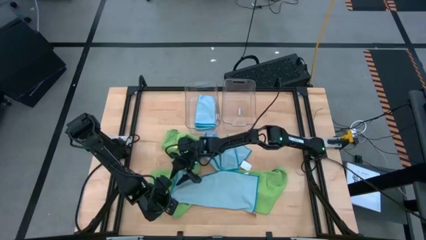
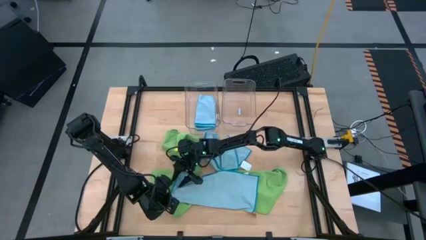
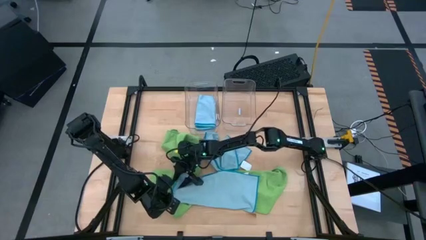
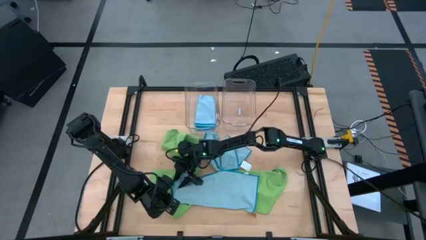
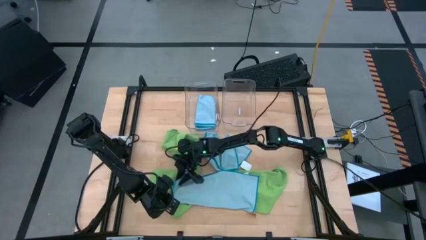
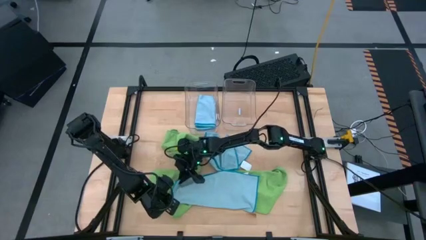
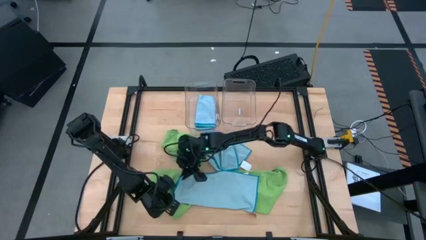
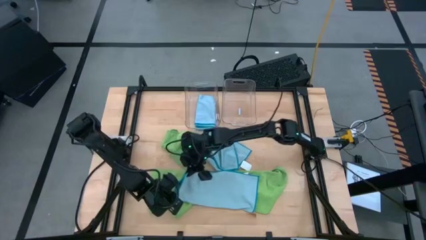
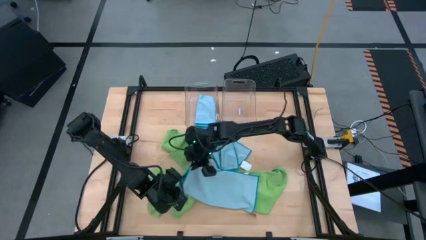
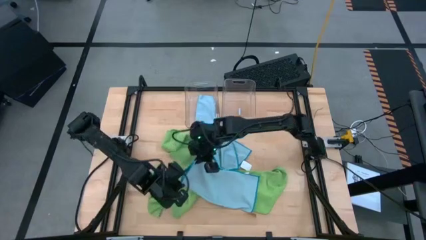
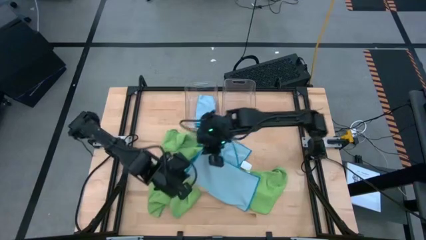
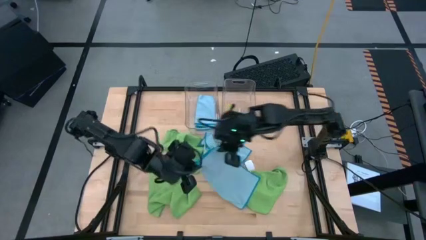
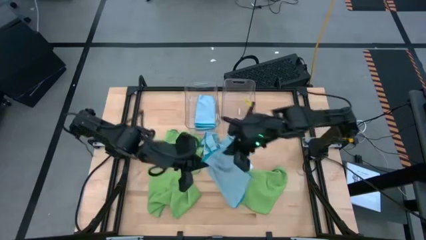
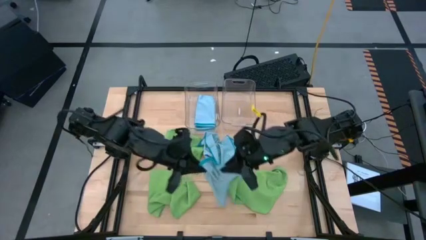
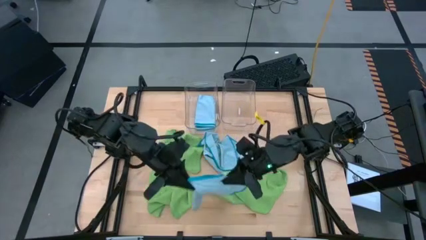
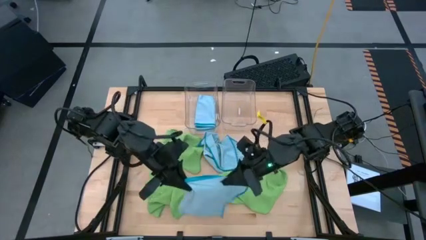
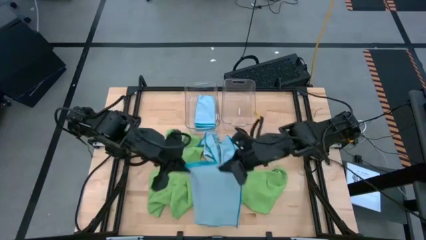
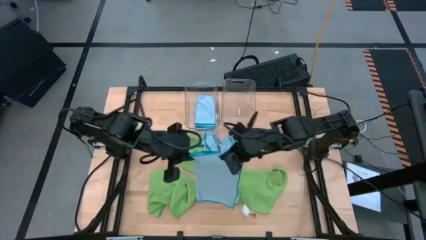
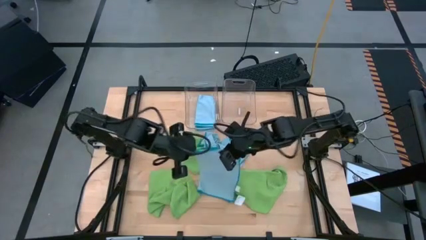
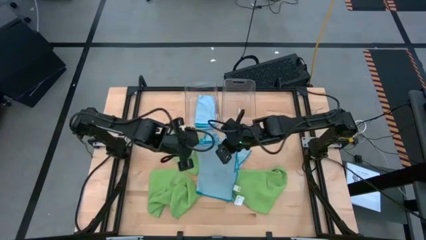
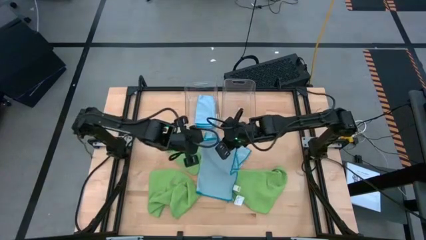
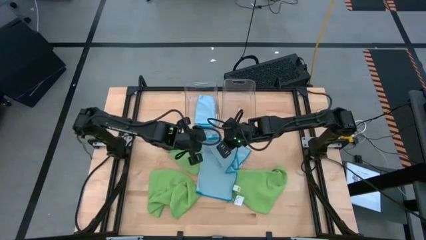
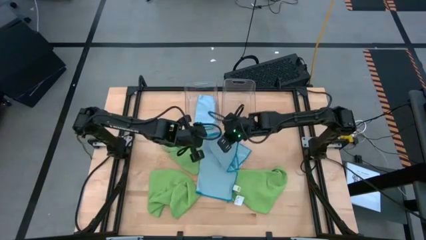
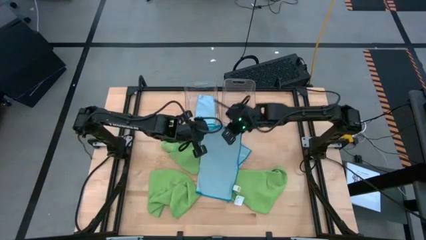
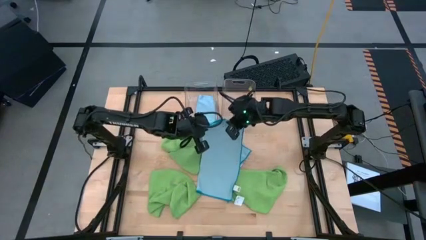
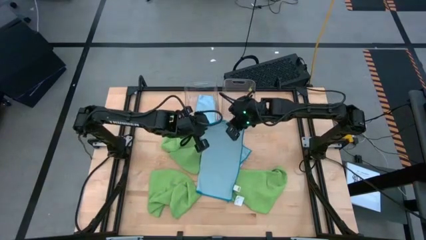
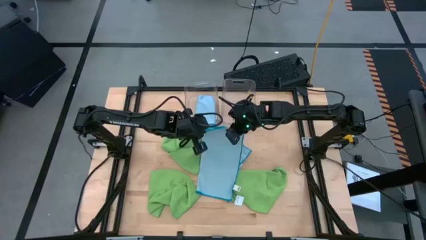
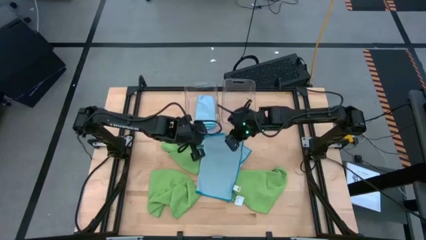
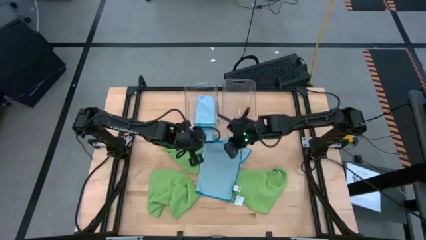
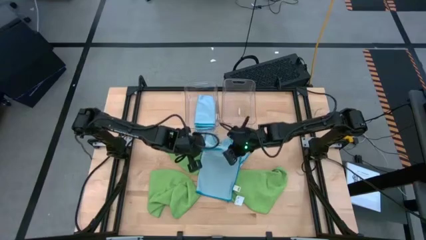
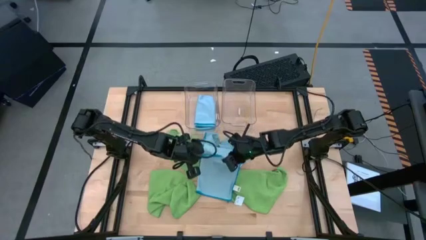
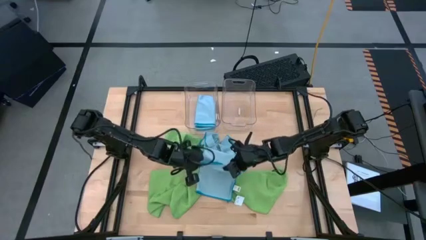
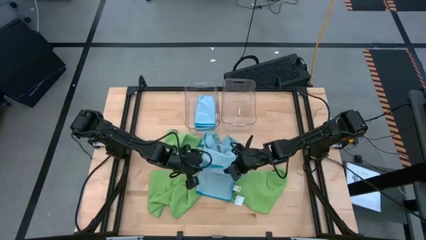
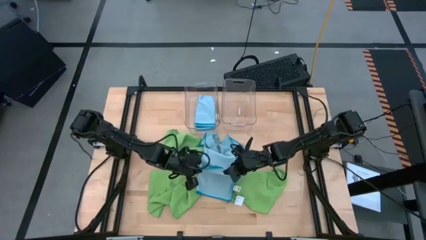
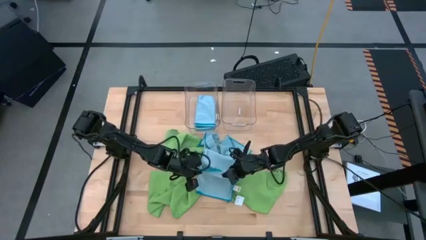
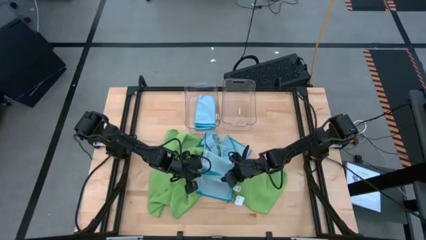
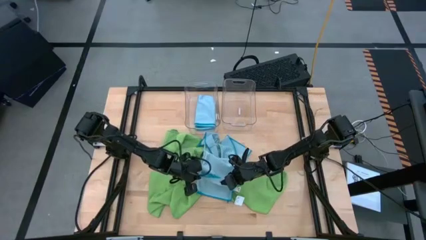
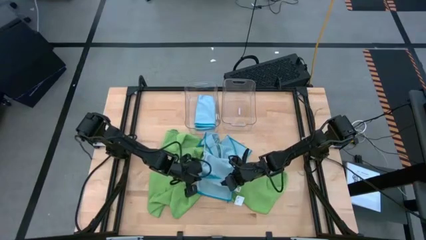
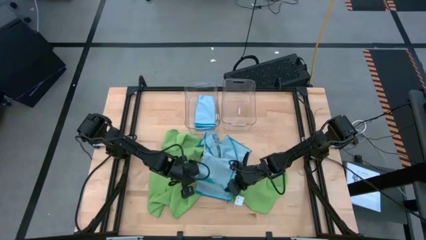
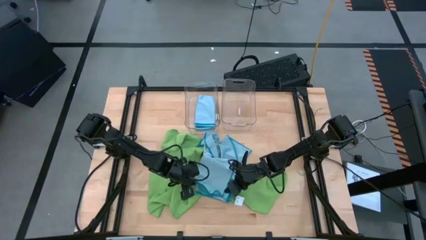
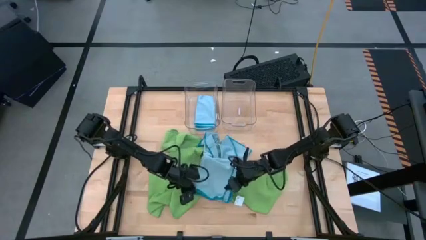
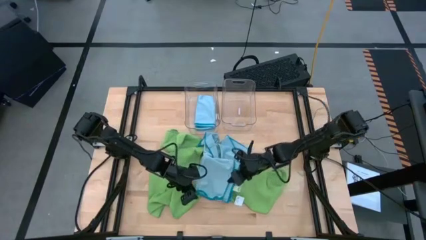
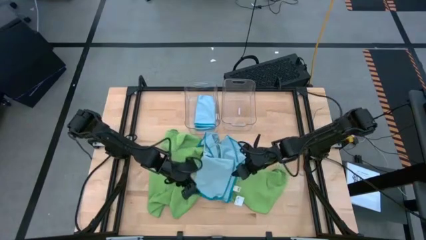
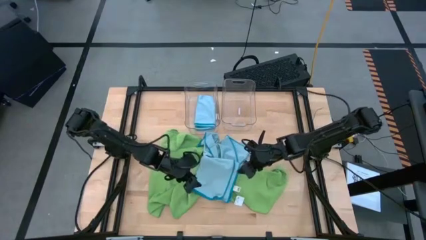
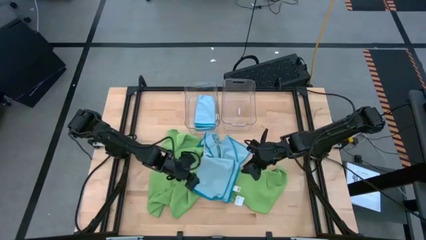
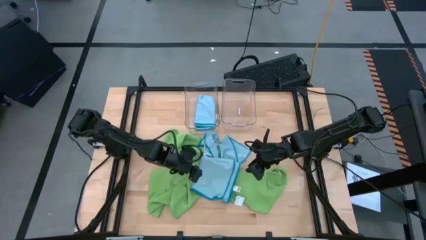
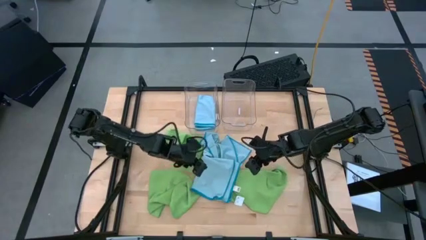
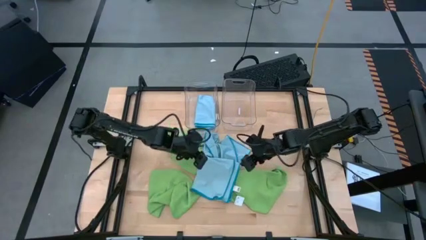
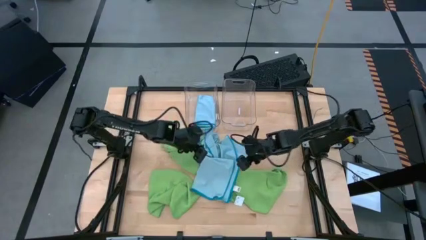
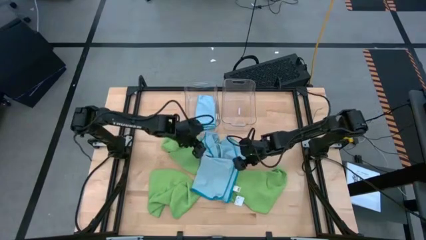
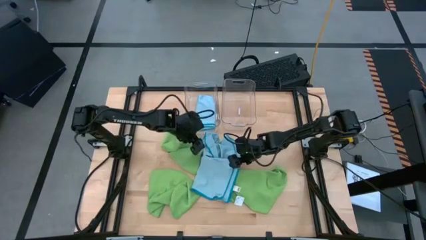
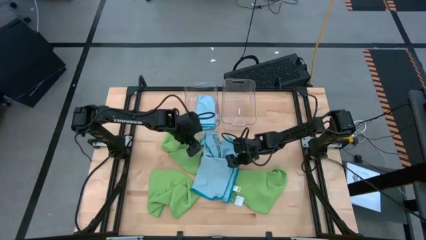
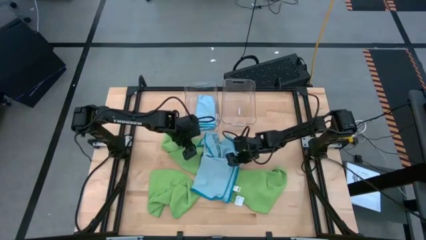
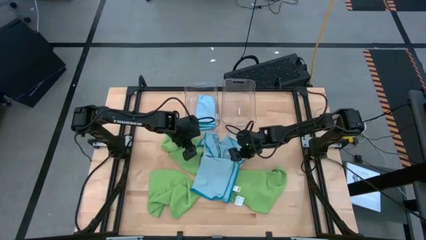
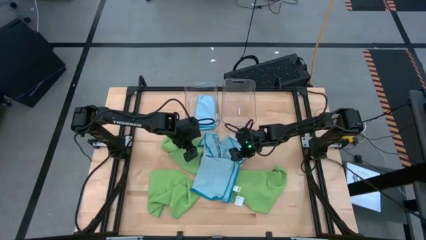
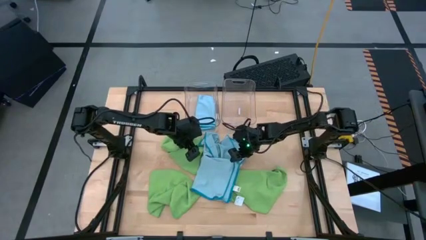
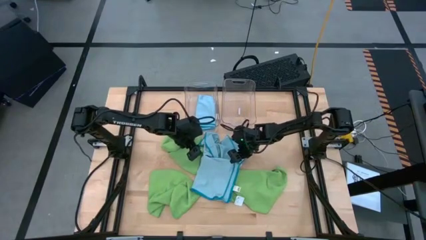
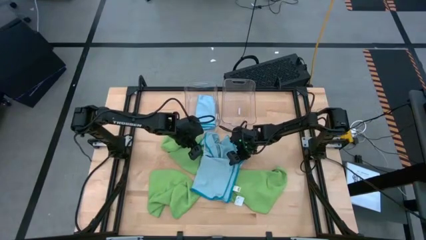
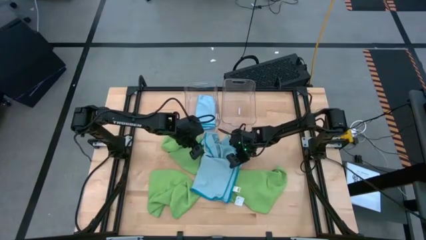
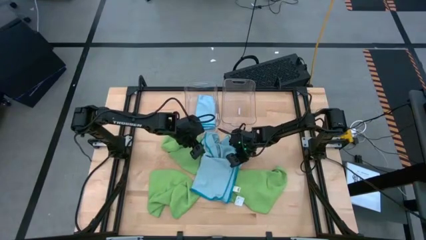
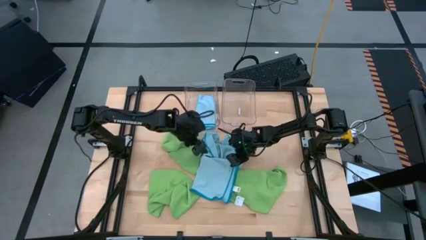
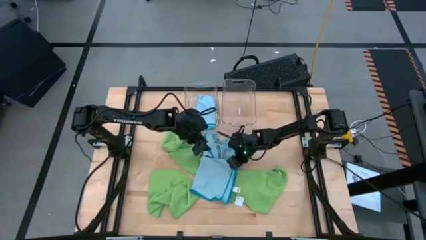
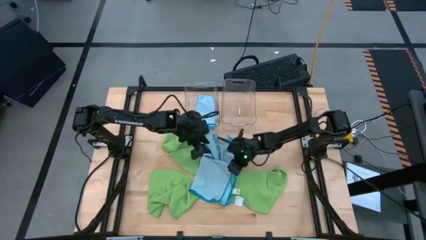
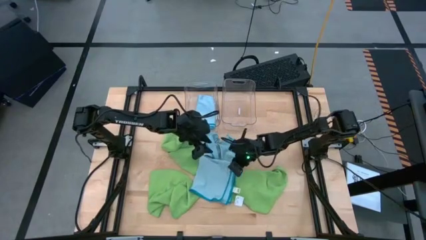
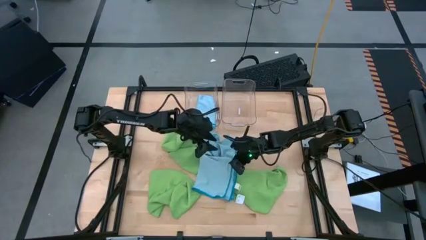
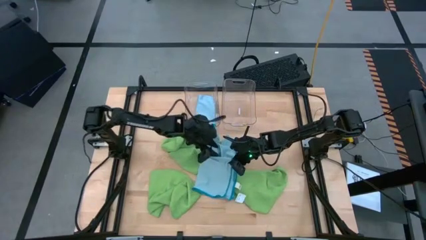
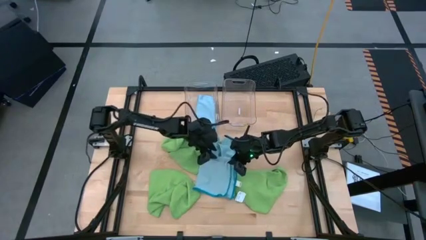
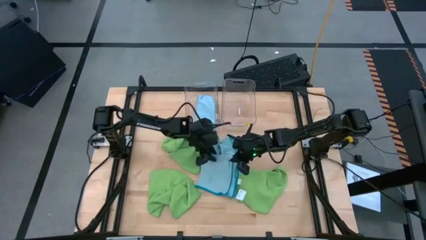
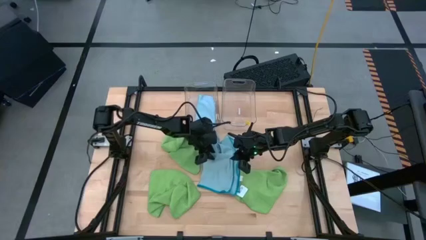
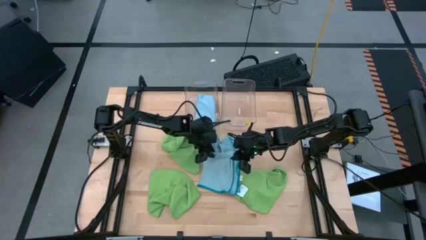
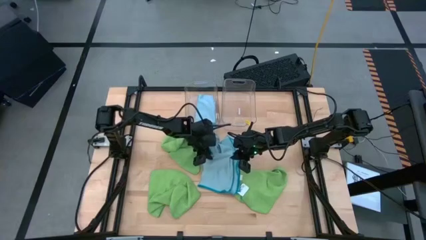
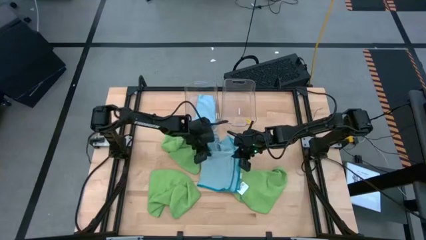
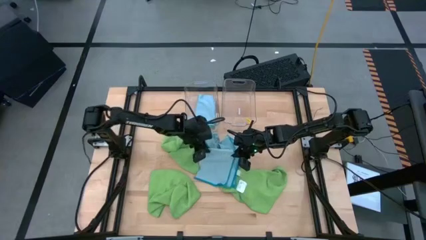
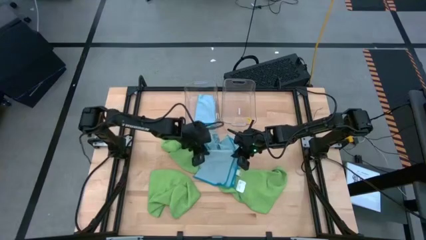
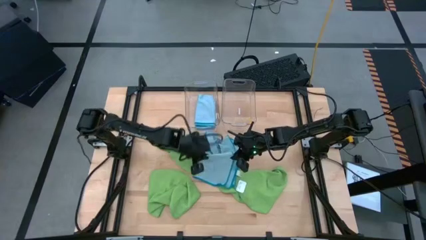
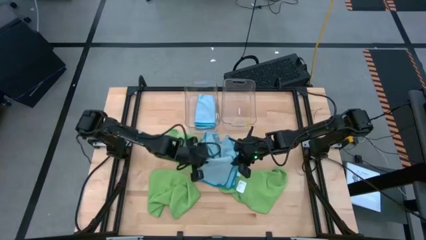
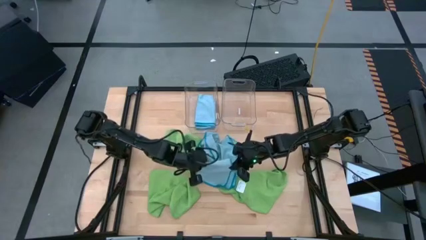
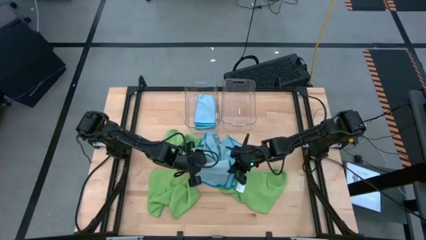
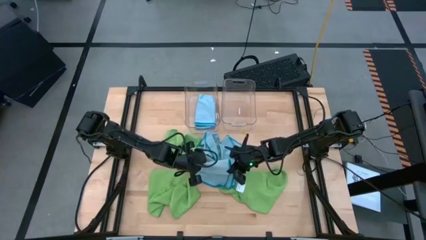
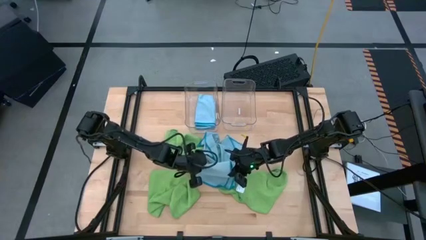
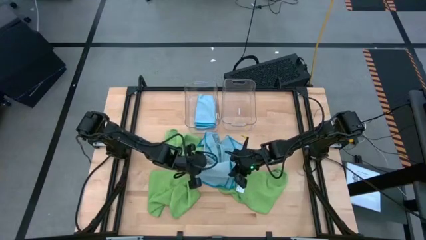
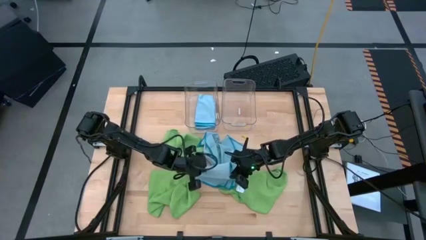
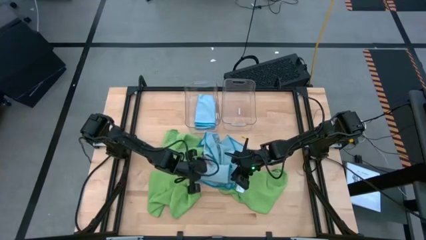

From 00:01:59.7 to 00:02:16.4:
Task: Fold microfiber towels
Fold the bottom blue microfiber towel
